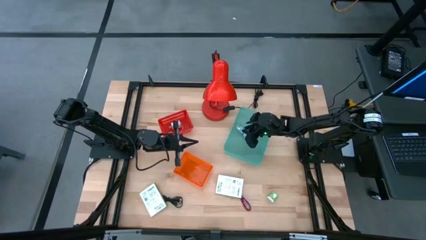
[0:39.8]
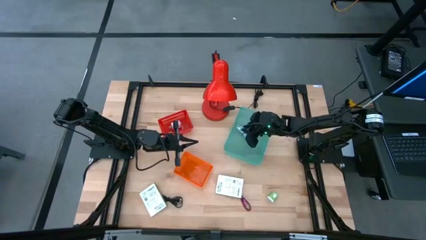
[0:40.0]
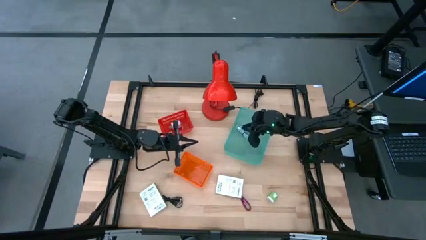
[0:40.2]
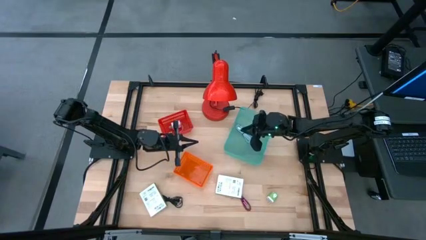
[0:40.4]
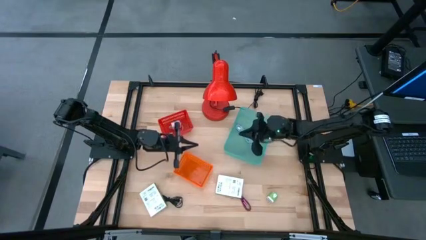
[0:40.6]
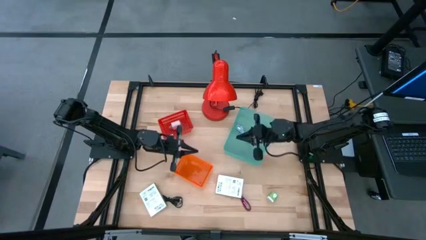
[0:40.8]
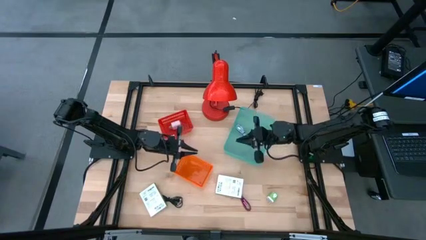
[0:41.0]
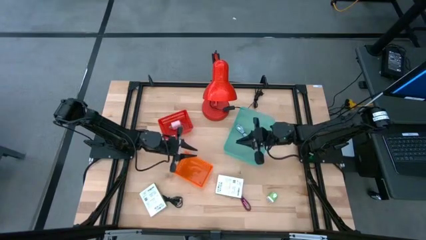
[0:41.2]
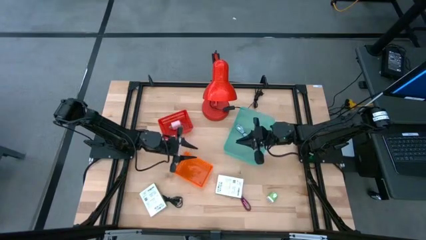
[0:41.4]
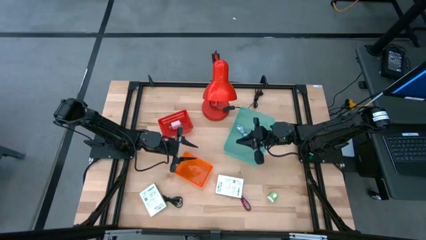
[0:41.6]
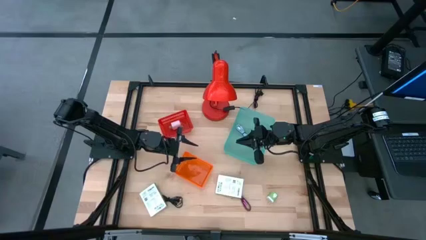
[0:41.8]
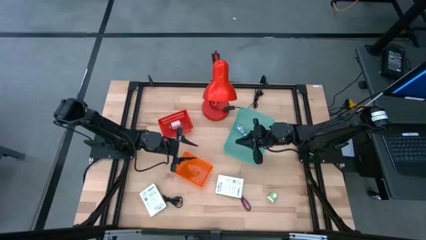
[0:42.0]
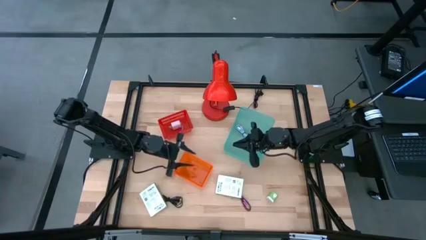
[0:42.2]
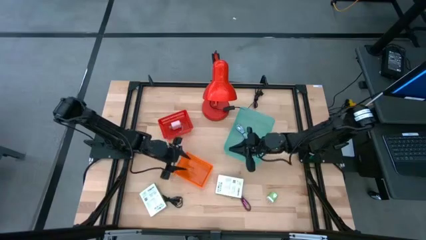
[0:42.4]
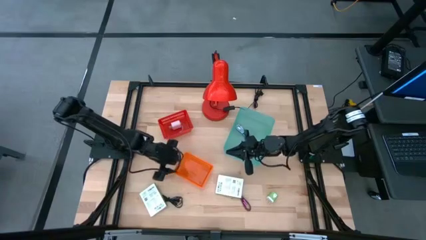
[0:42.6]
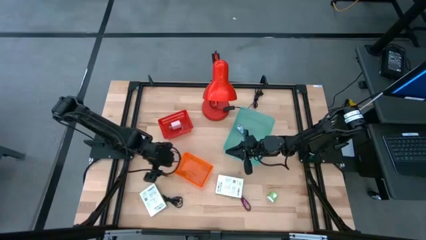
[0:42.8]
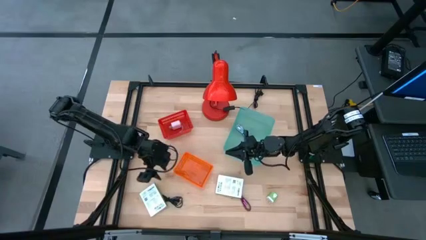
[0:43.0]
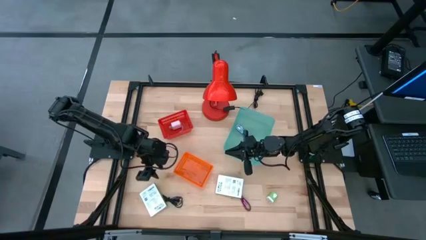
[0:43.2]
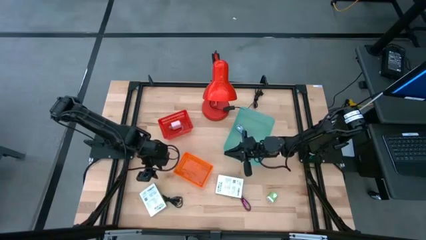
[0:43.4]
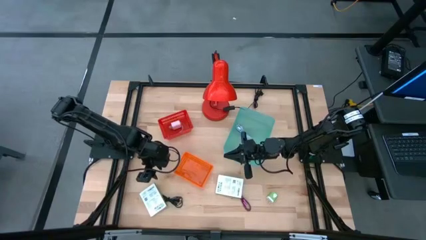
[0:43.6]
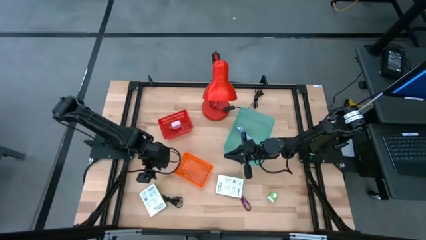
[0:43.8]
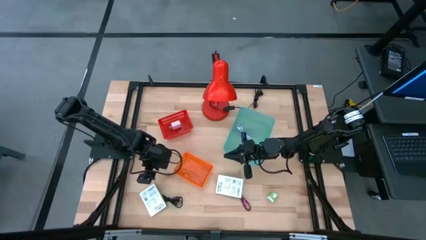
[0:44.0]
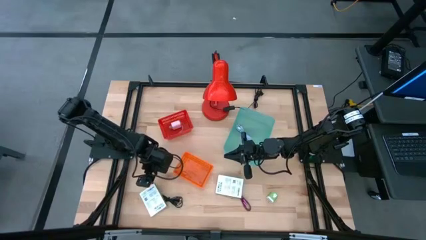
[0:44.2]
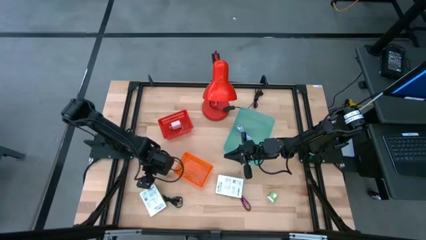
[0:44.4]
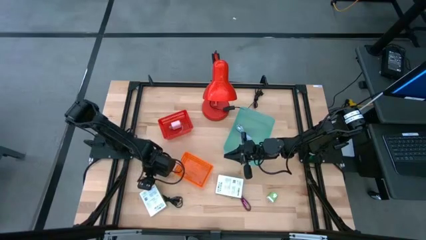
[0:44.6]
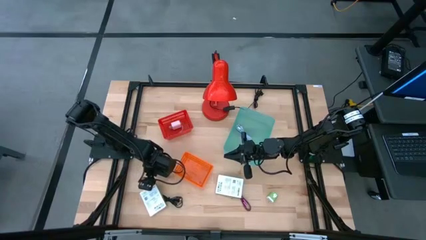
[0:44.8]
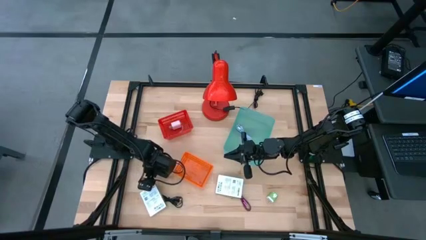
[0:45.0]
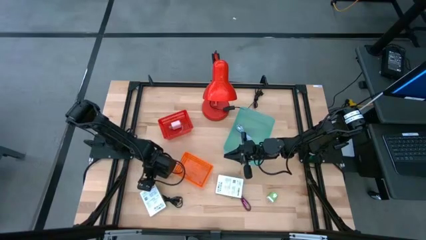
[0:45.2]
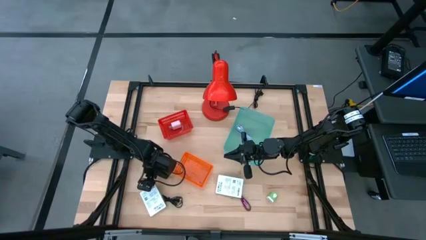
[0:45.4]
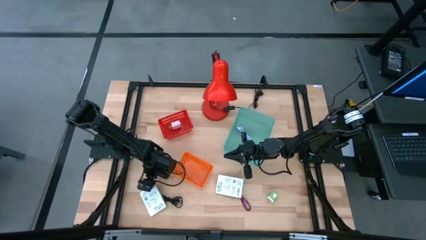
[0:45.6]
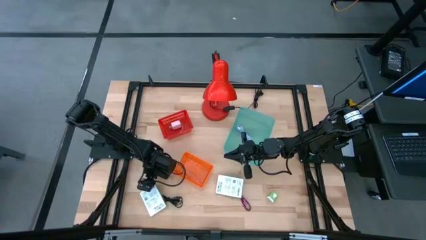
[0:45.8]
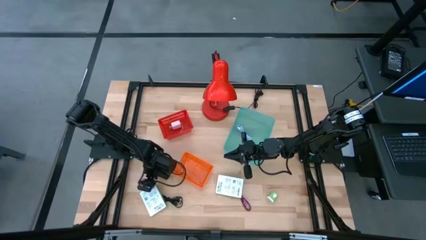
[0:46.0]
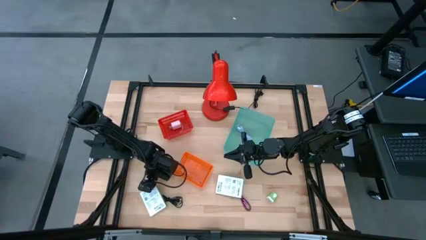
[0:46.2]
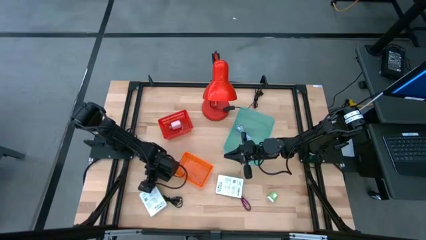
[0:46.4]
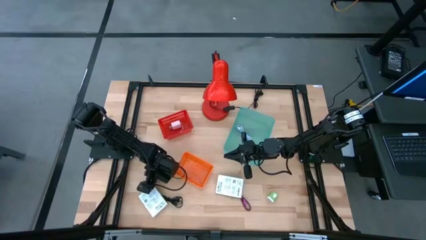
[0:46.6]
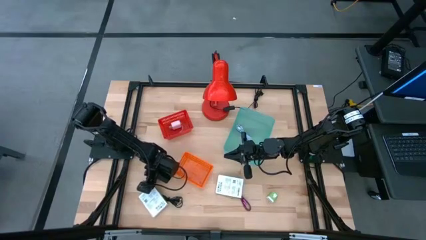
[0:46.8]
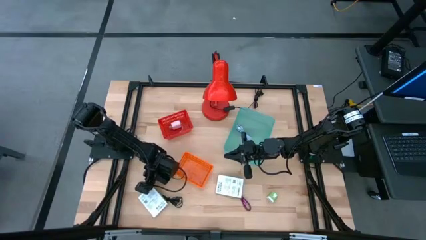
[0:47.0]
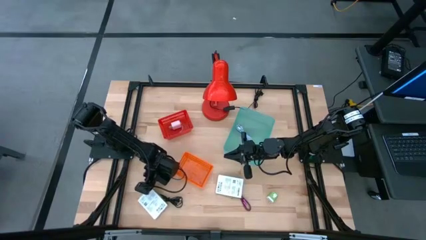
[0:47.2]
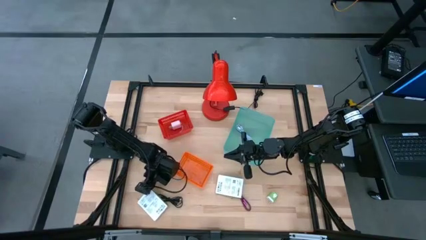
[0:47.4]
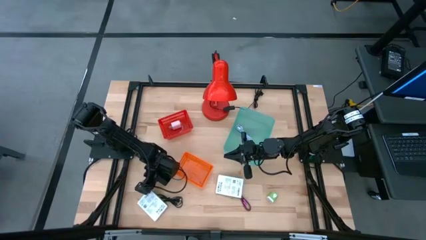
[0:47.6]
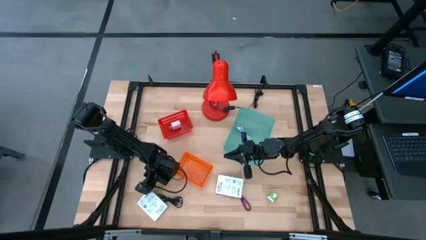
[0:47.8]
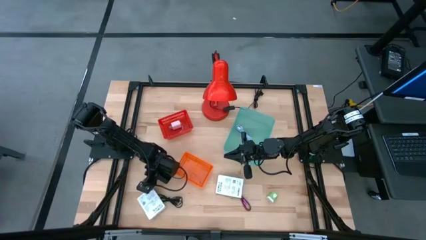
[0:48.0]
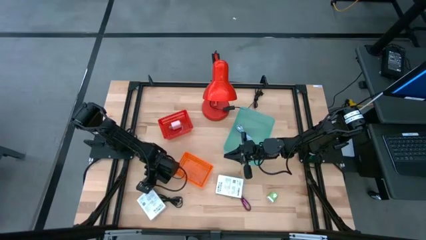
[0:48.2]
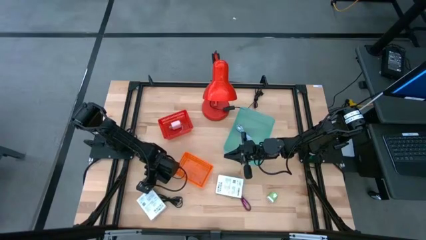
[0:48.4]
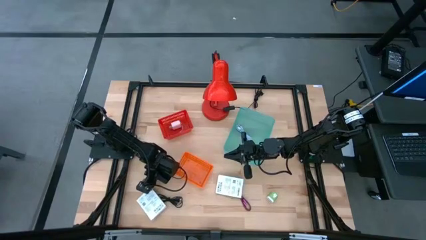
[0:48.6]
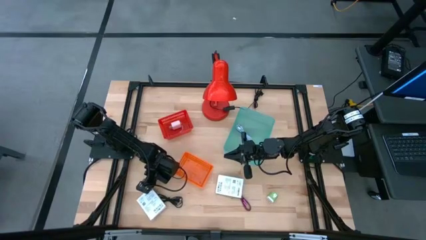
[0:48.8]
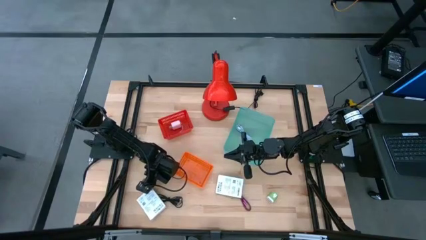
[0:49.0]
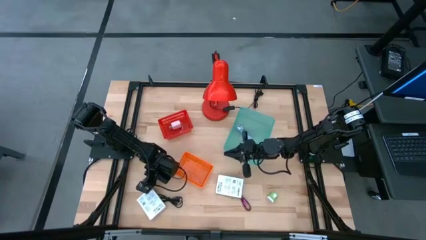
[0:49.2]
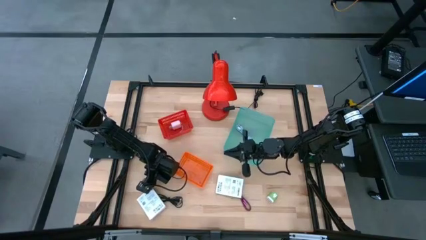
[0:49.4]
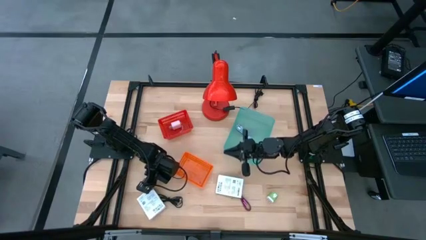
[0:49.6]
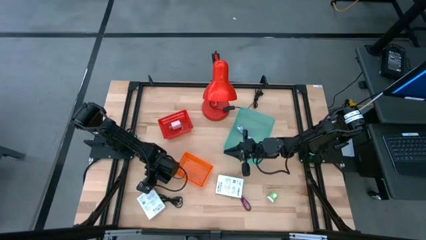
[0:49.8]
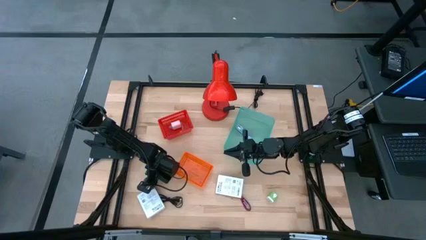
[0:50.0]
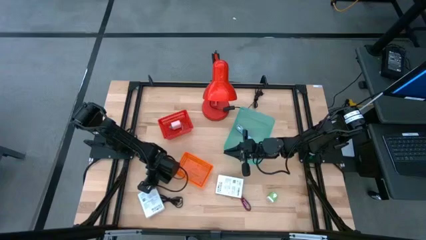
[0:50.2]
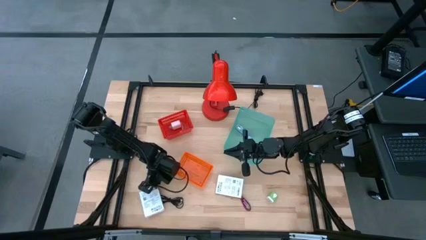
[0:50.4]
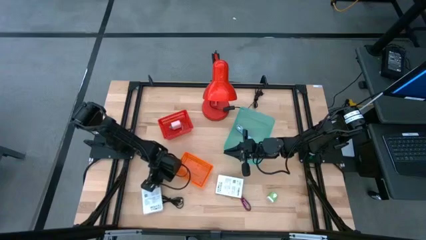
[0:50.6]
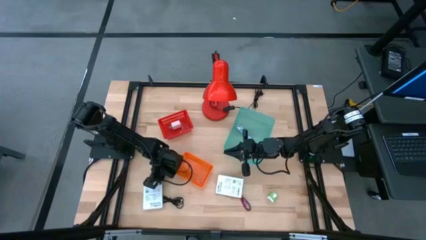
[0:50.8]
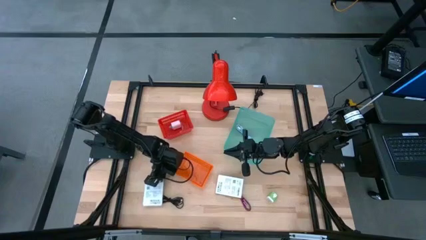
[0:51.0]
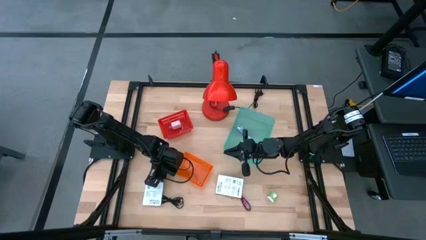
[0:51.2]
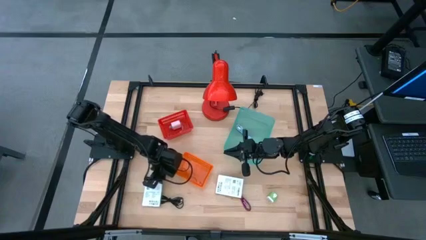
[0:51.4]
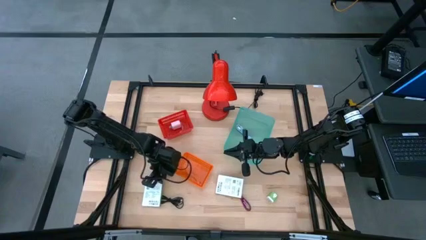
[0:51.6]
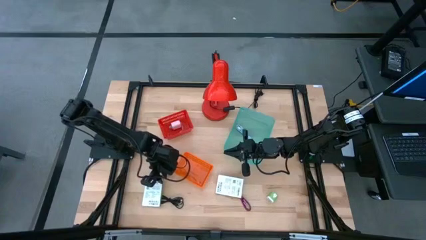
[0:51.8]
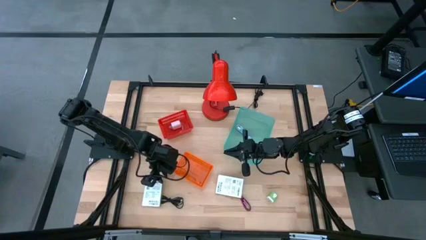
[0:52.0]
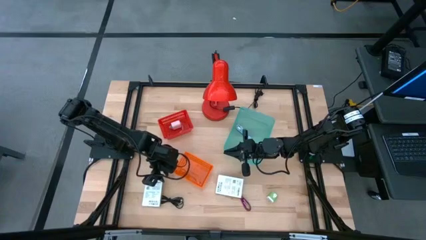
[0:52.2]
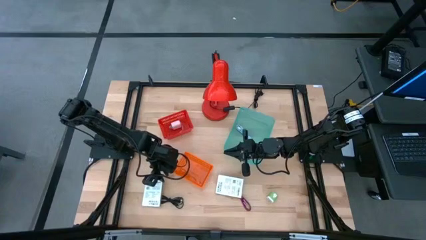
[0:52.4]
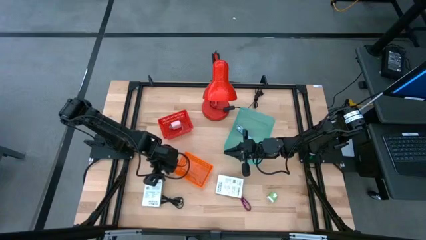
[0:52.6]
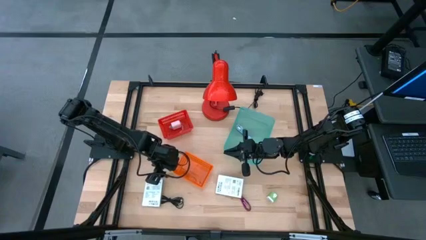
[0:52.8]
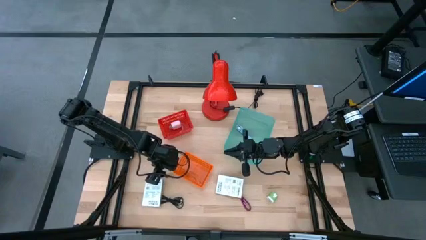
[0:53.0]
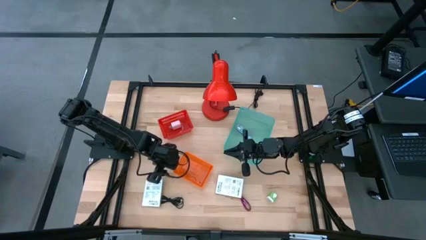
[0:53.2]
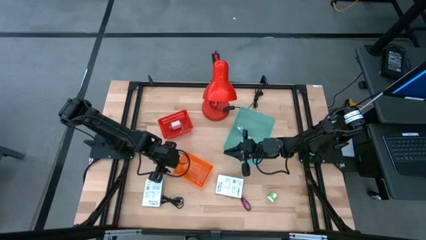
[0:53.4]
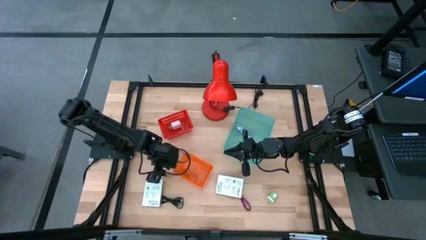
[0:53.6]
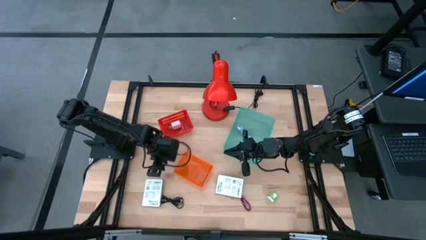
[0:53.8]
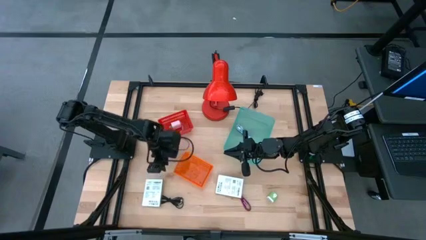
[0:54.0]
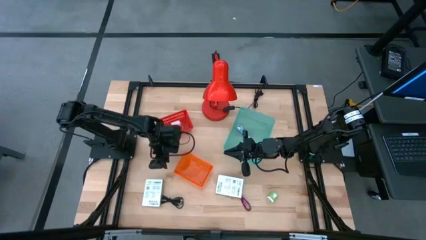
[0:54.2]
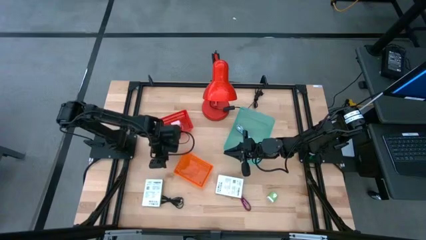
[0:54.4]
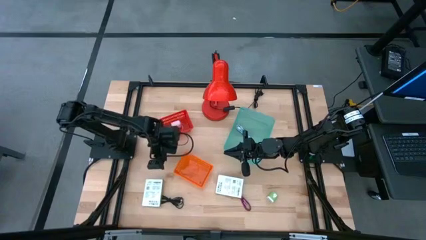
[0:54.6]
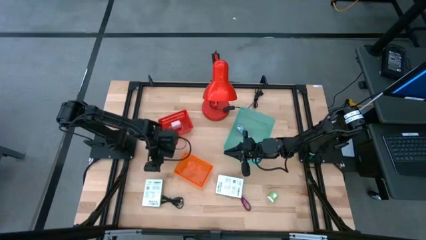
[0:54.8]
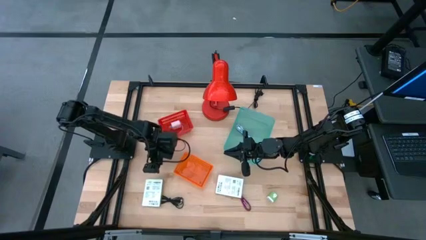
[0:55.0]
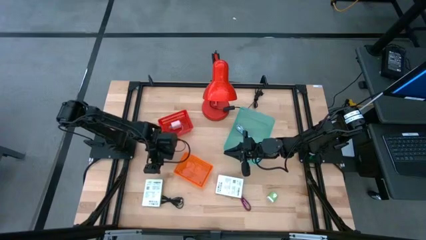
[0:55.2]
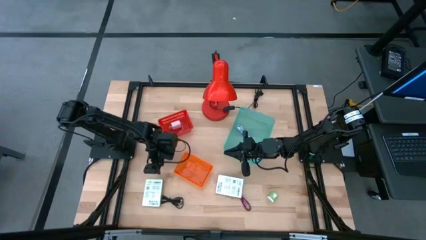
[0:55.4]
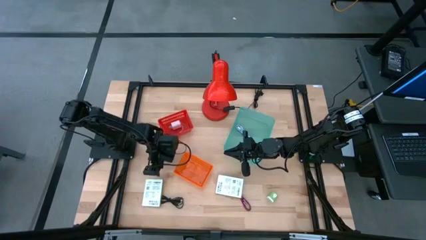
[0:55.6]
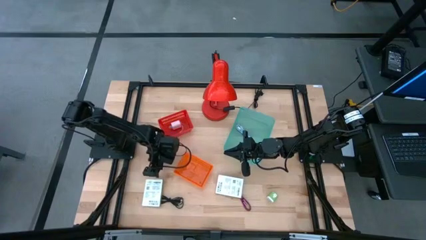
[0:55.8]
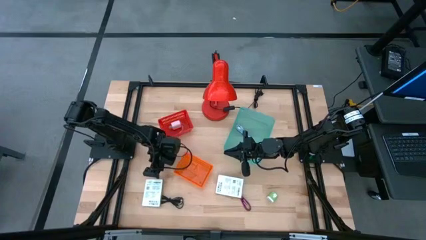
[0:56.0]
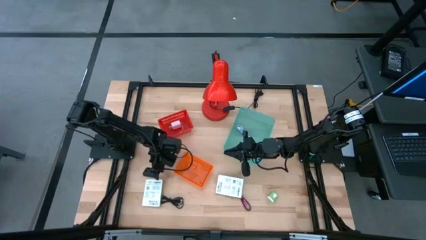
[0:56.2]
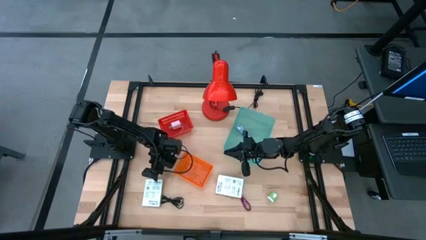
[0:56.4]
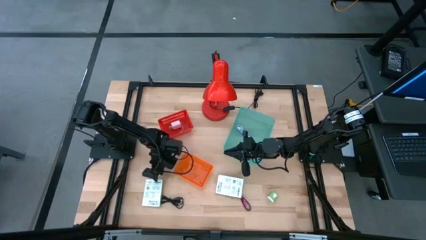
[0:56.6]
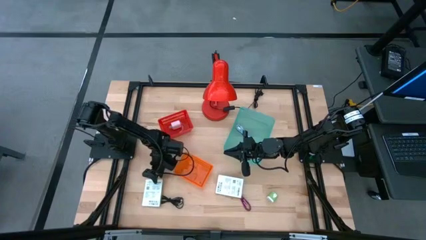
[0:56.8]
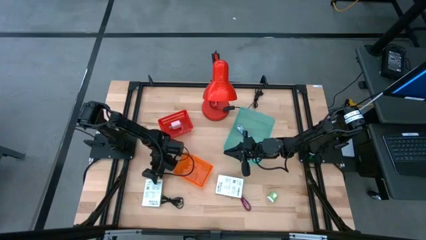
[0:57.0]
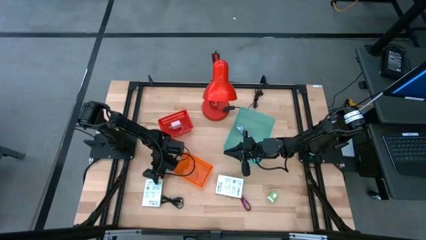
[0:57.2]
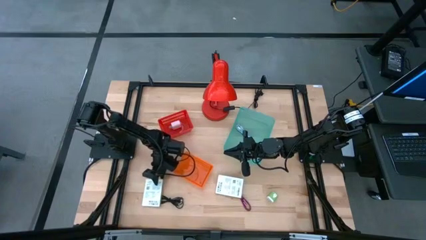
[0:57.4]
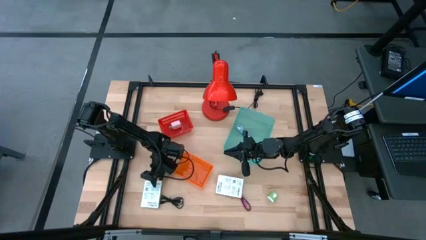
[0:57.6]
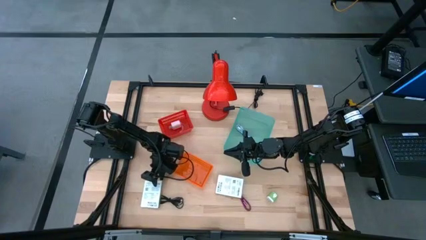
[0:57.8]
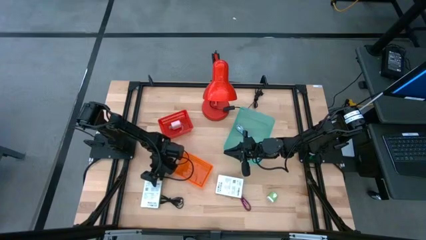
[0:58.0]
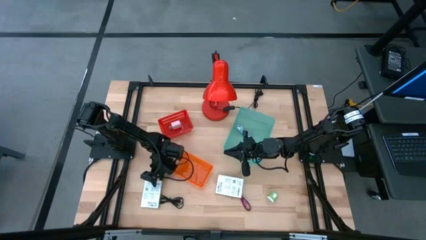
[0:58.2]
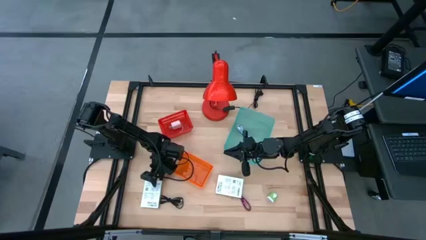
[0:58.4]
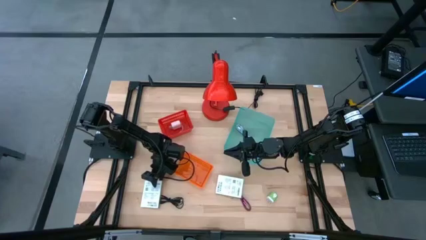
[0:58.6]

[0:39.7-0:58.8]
Task: Pick and place items into bin
Put the left white card reader box into the orange bin
